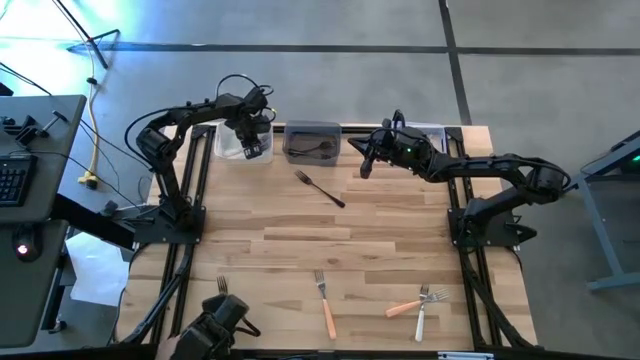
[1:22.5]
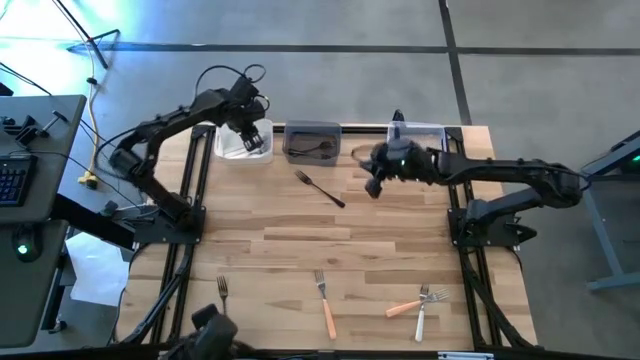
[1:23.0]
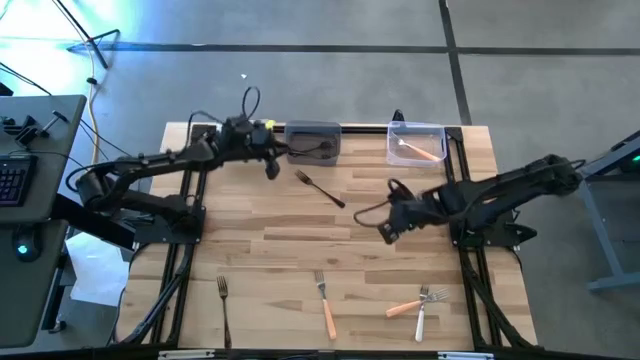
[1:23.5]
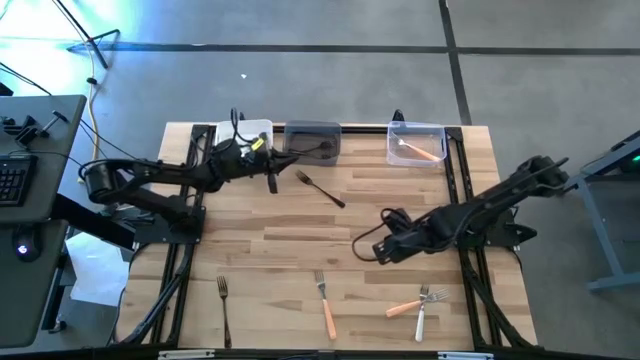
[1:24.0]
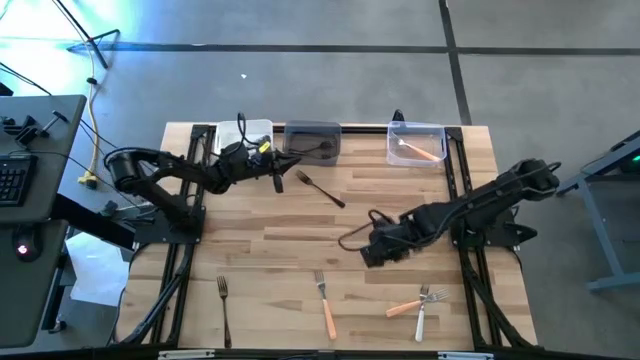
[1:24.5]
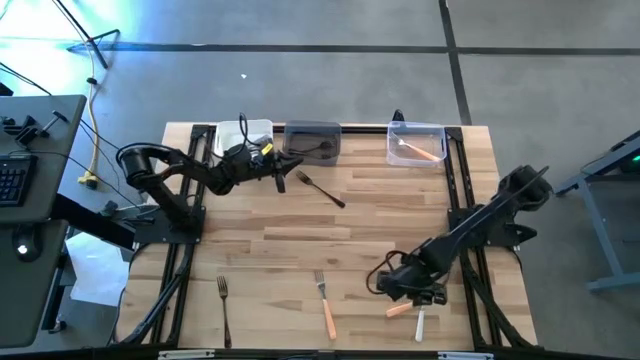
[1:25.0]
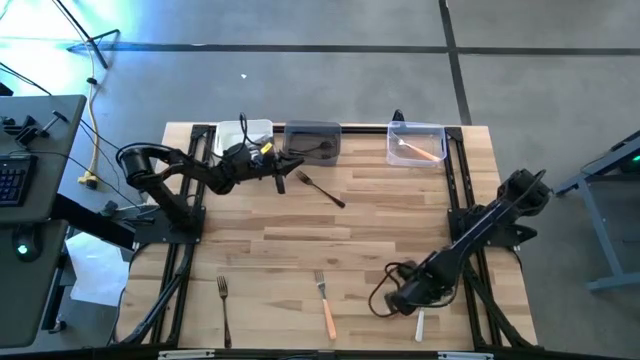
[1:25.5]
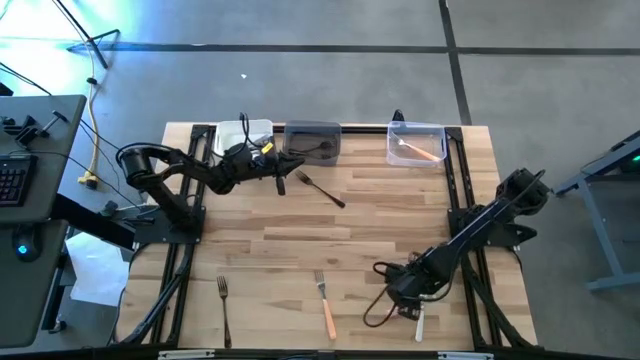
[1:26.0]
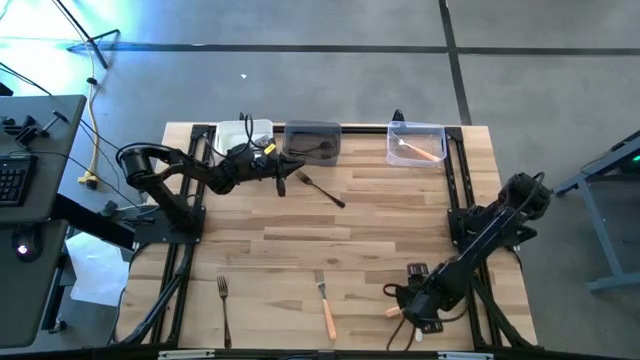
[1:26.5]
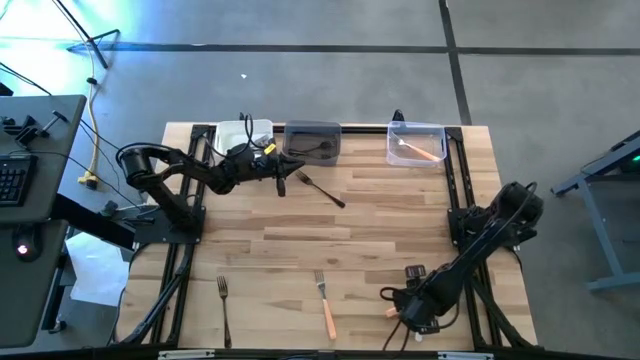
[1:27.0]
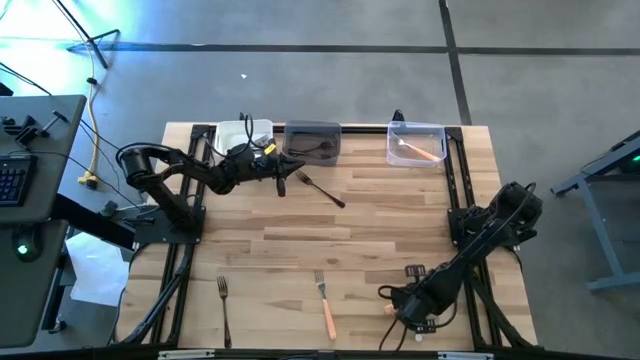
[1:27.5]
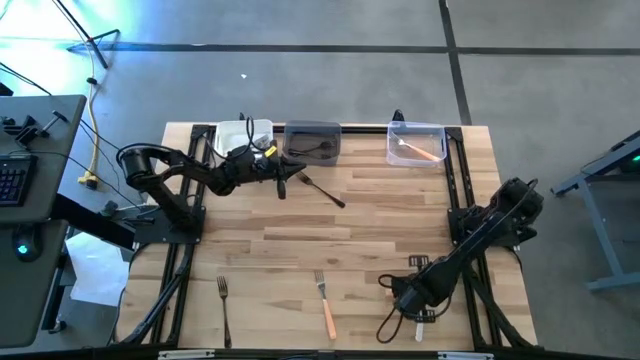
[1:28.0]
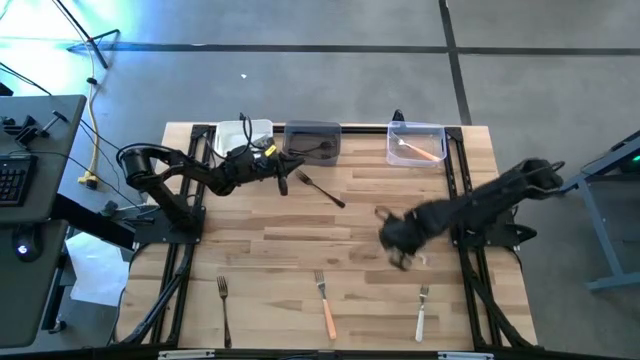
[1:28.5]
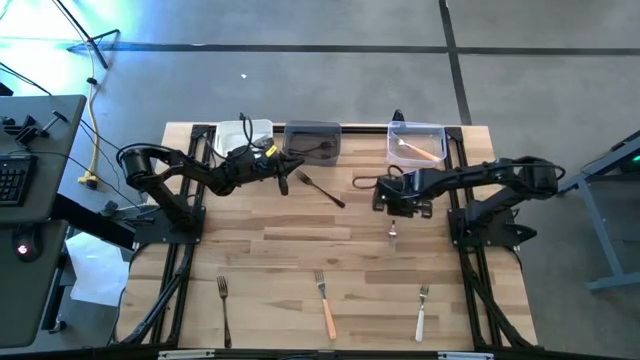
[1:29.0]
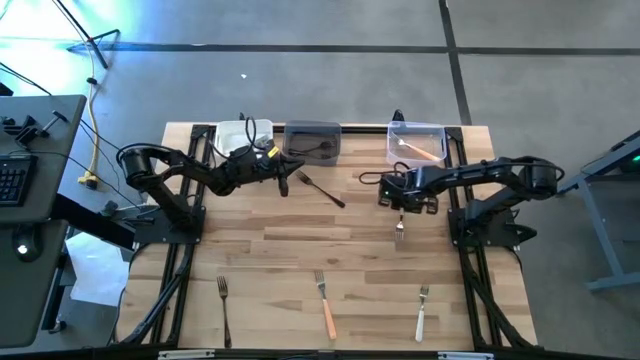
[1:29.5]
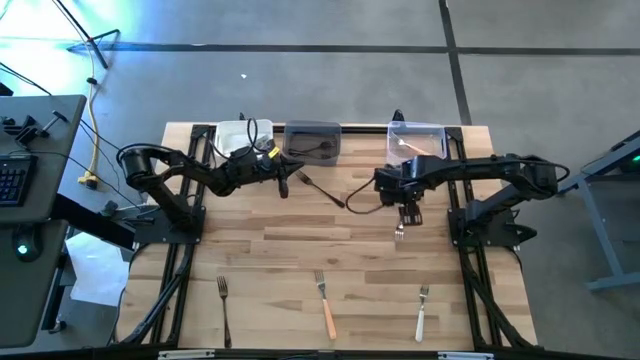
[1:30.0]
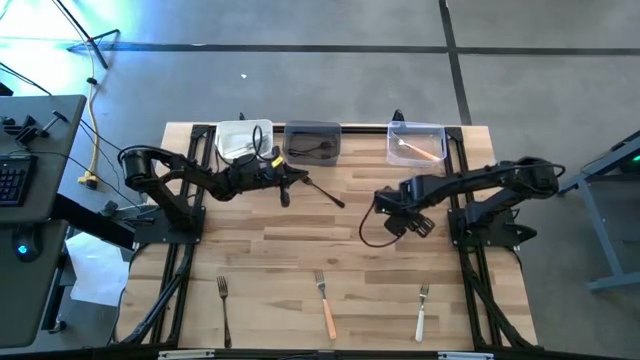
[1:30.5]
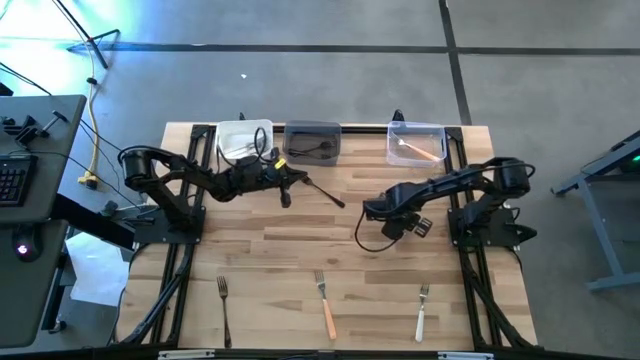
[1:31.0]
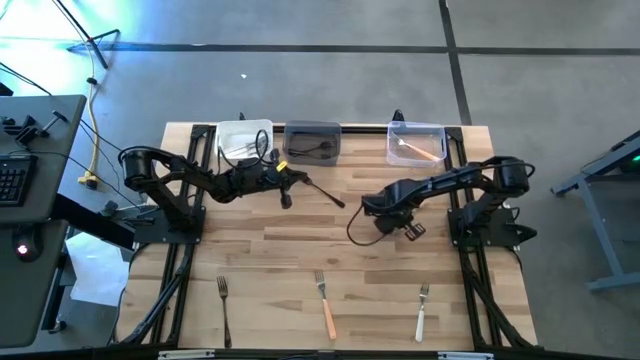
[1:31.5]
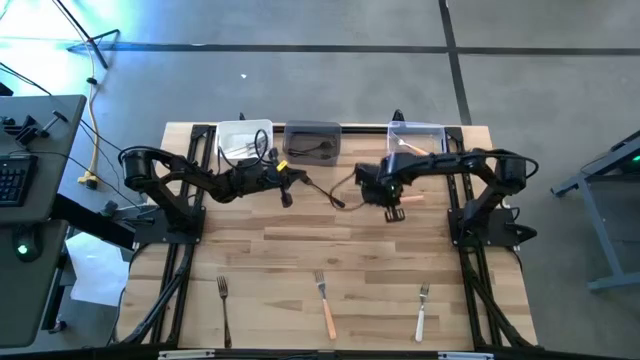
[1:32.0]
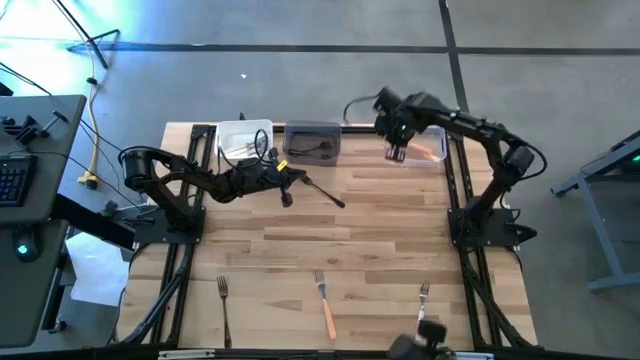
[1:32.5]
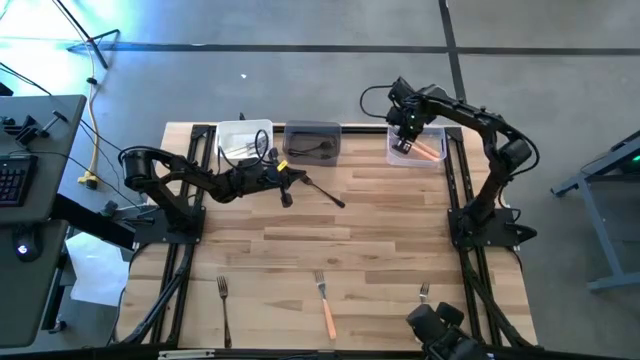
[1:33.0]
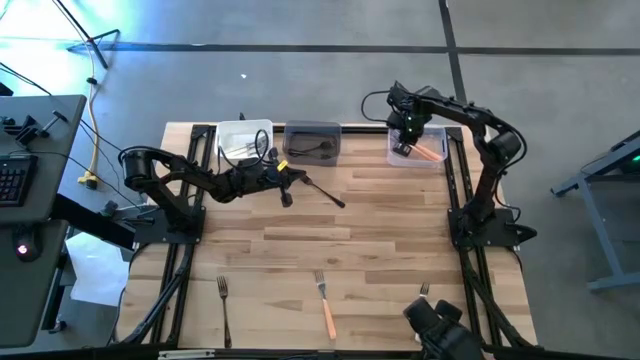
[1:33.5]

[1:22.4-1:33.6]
Task: Sort silverware by color (type)
Put the orange fork into the transparent bin

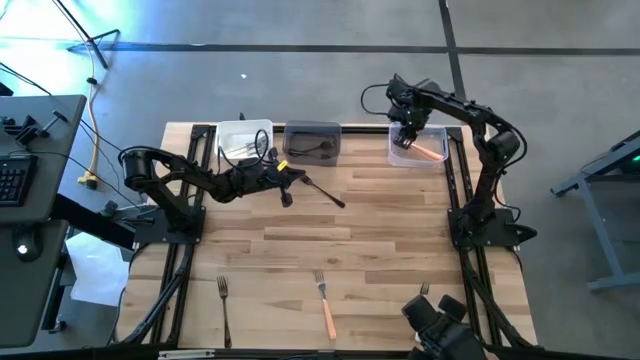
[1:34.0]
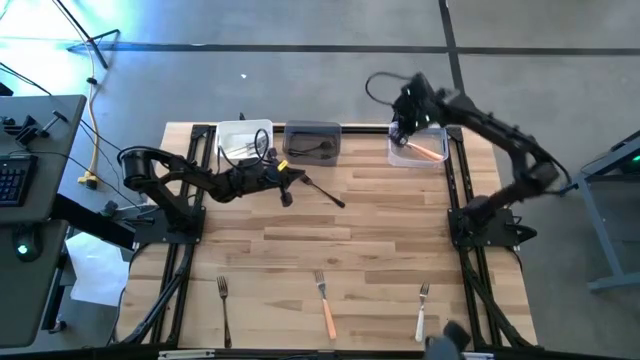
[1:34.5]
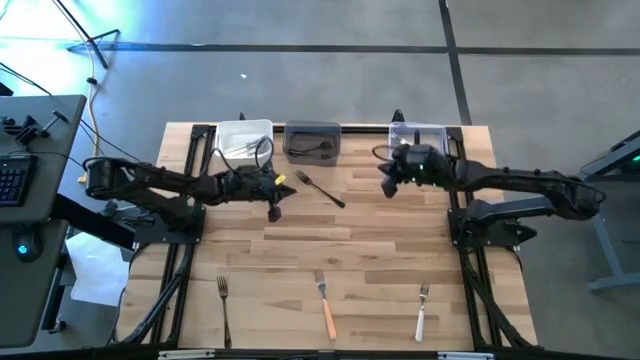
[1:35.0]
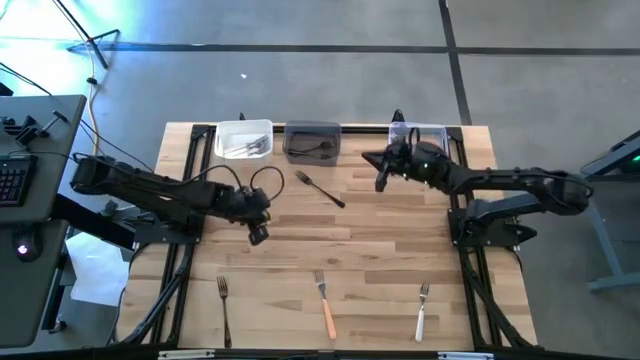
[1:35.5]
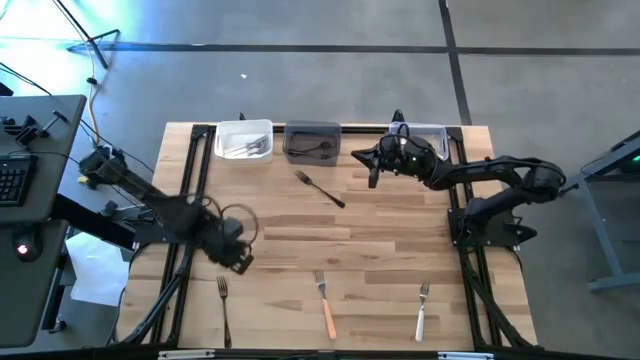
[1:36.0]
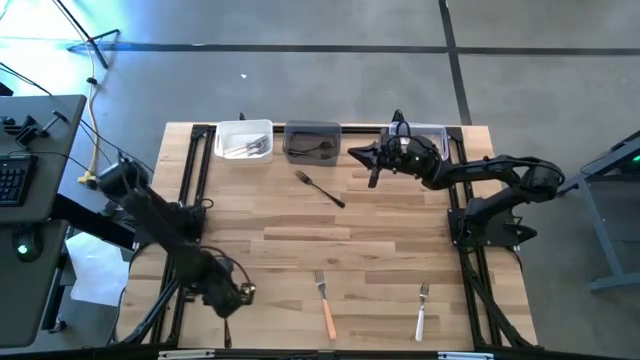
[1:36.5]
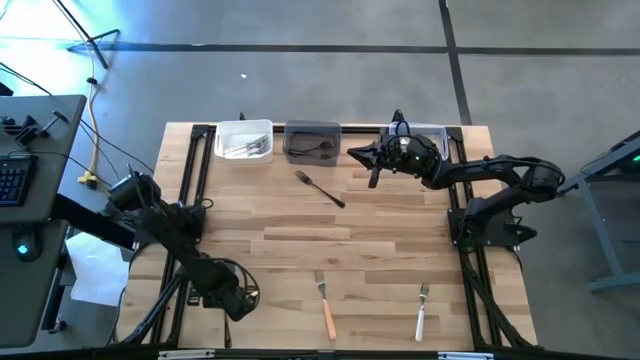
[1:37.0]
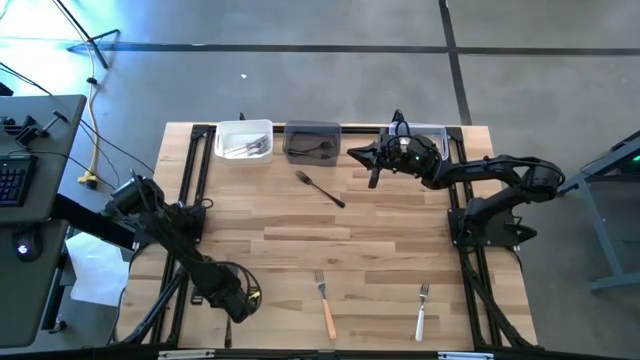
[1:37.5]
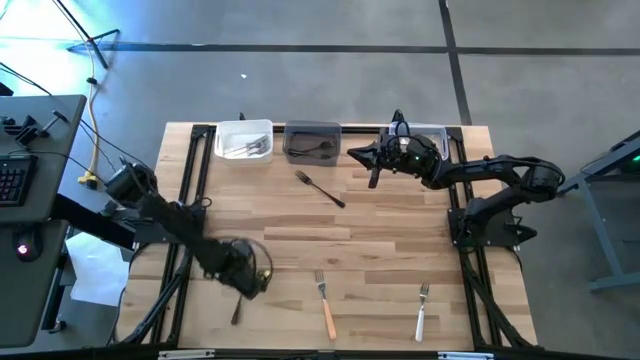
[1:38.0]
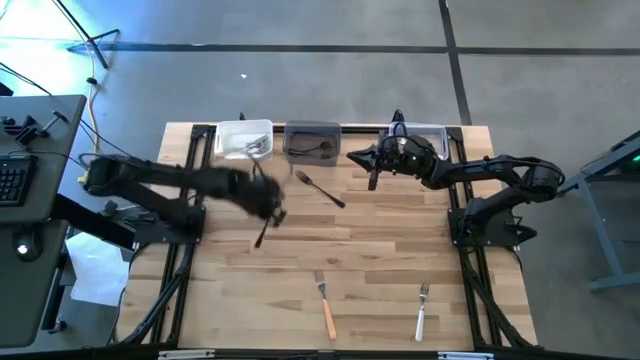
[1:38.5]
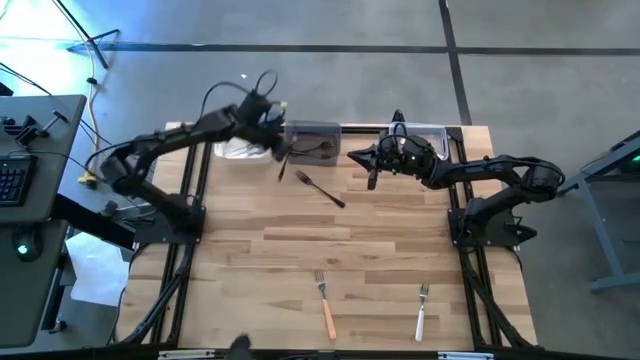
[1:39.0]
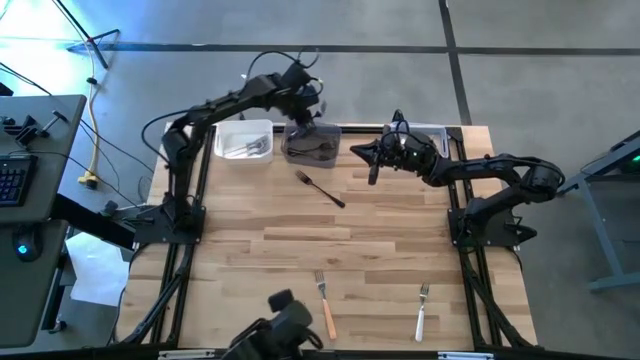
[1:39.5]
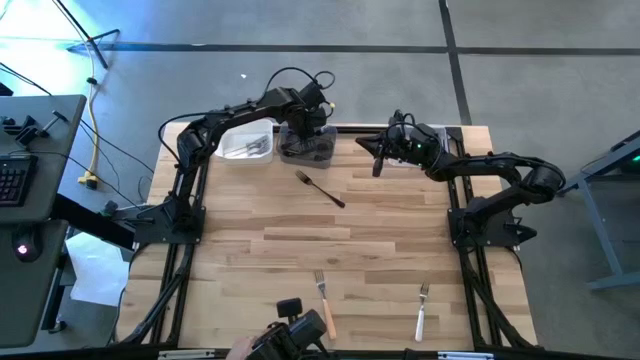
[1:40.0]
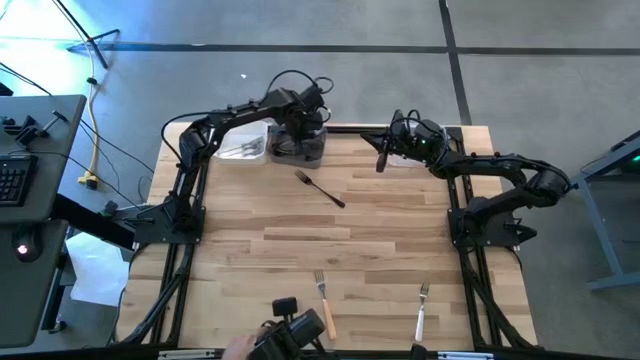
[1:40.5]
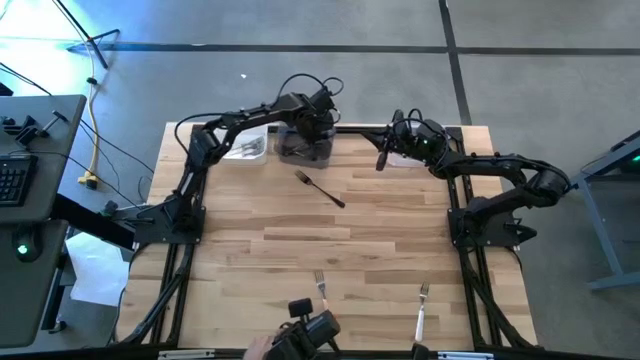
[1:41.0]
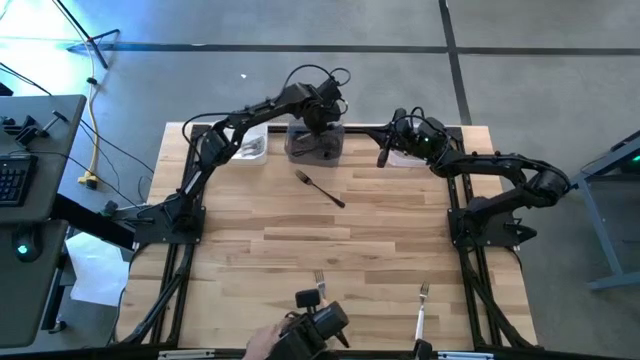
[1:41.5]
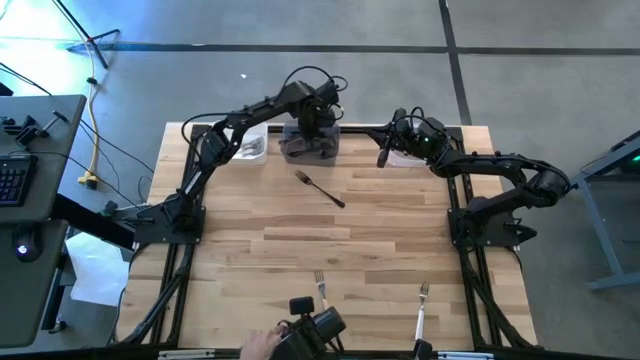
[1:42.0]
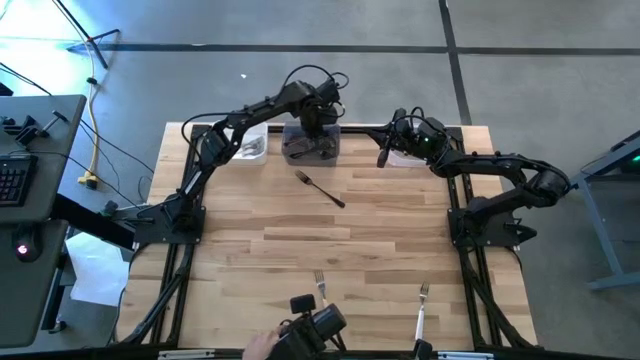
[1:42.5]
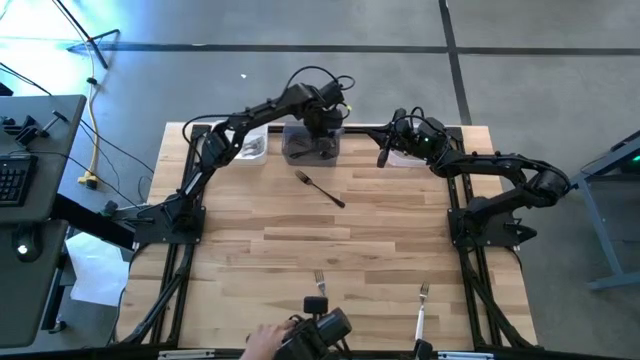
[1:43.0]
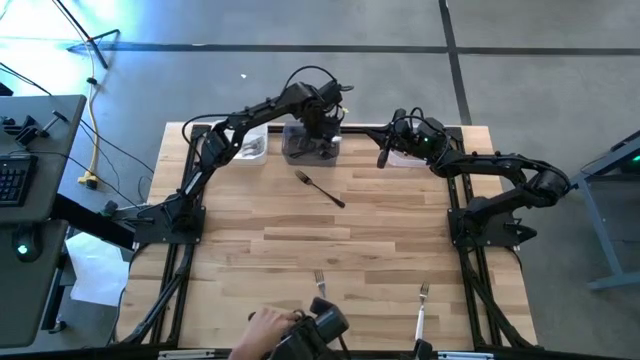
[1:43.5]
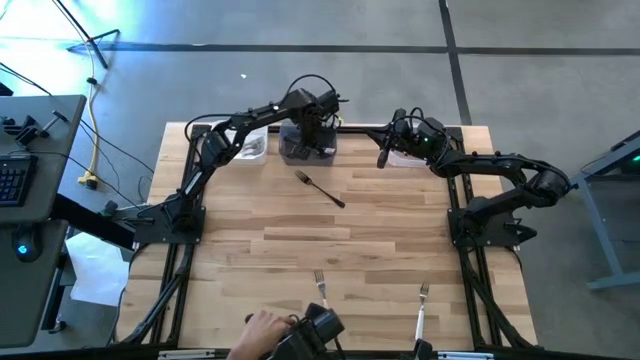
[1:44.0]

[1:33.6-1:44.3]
Put the bottom black fork into the black bin
